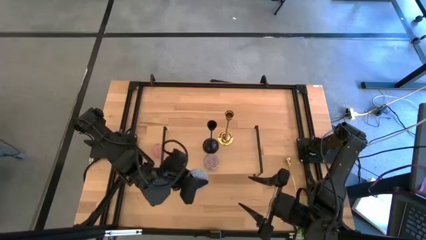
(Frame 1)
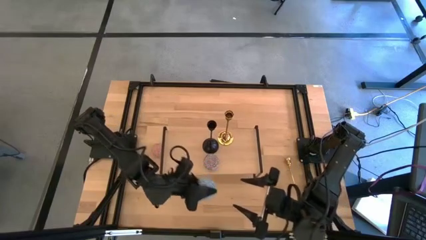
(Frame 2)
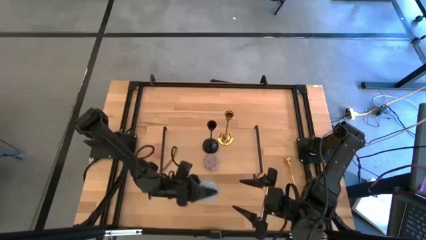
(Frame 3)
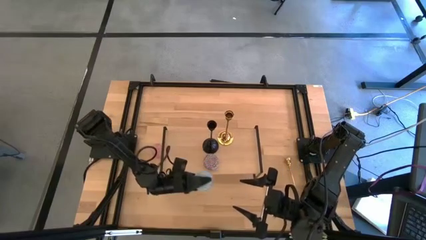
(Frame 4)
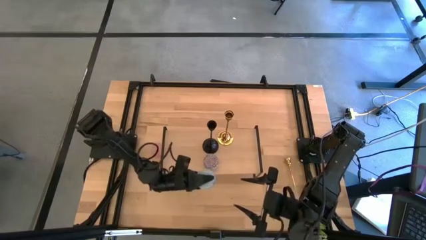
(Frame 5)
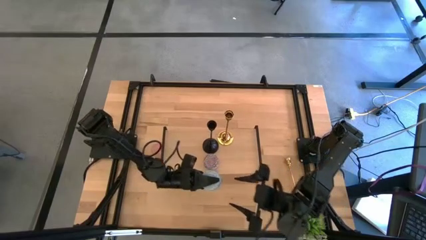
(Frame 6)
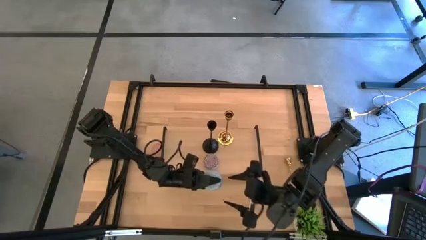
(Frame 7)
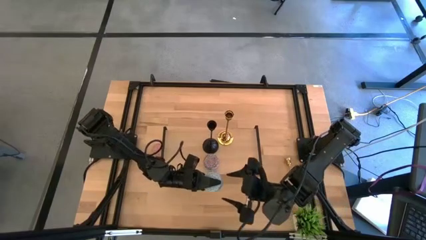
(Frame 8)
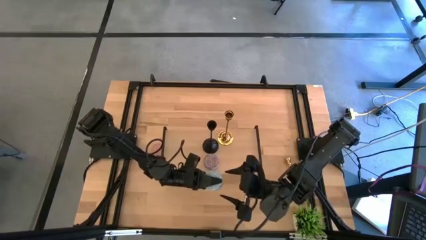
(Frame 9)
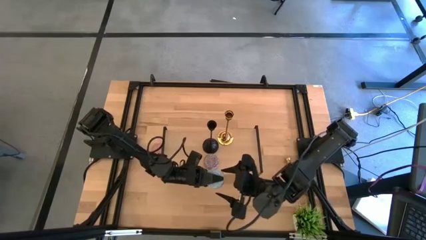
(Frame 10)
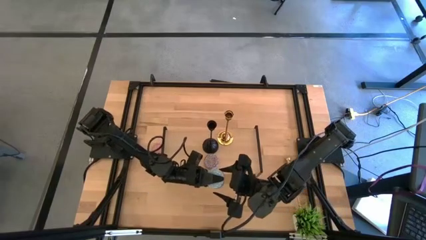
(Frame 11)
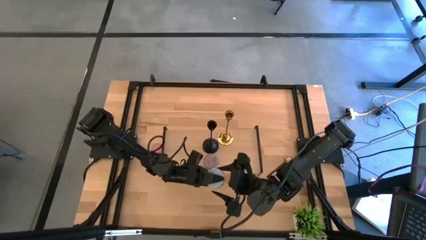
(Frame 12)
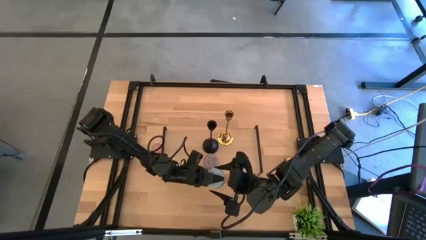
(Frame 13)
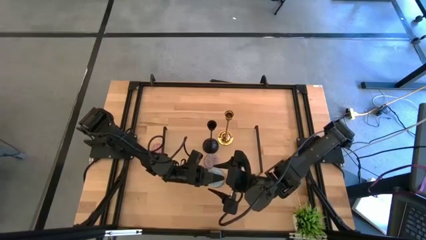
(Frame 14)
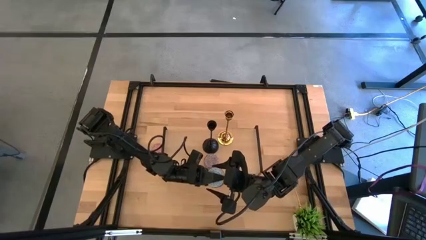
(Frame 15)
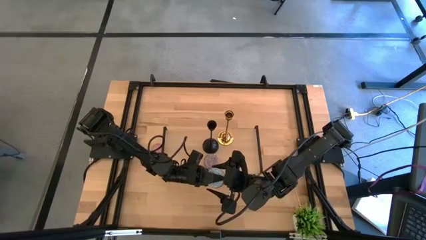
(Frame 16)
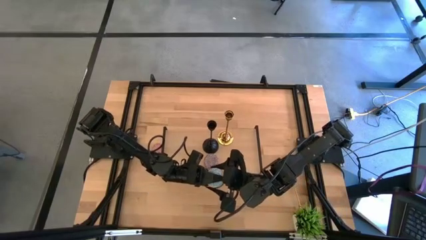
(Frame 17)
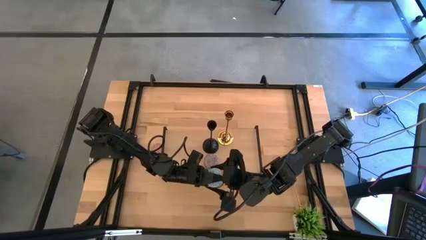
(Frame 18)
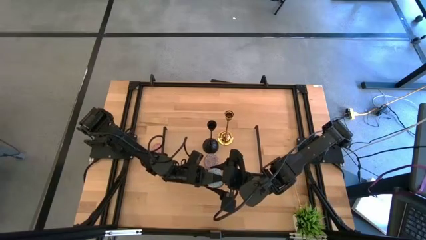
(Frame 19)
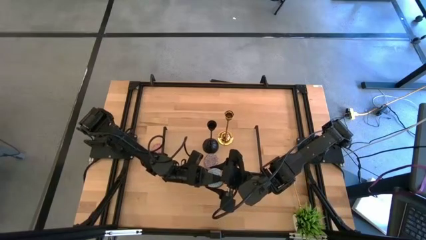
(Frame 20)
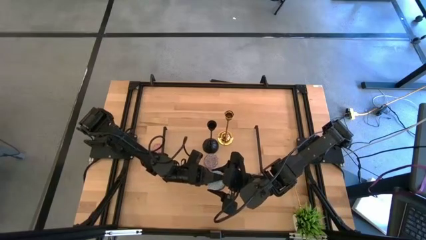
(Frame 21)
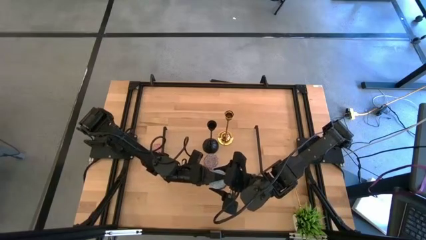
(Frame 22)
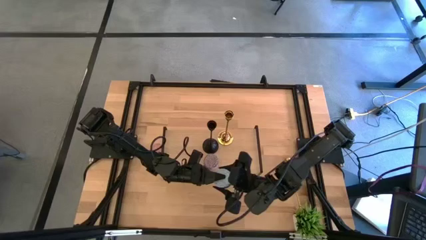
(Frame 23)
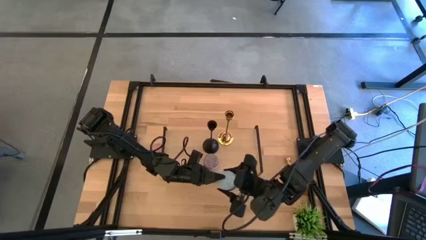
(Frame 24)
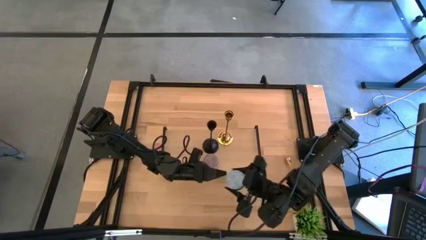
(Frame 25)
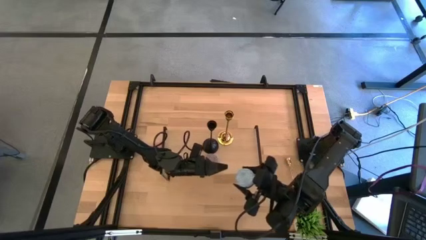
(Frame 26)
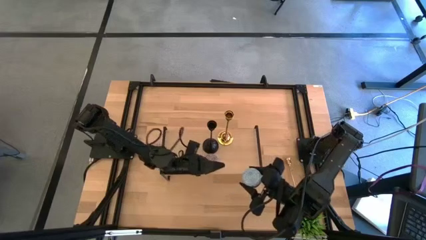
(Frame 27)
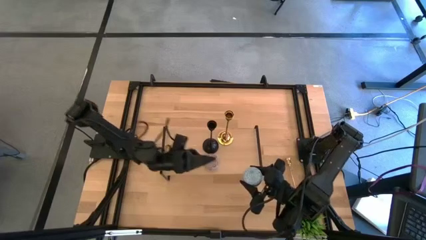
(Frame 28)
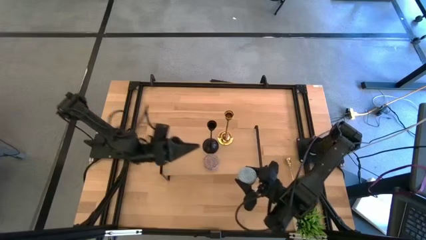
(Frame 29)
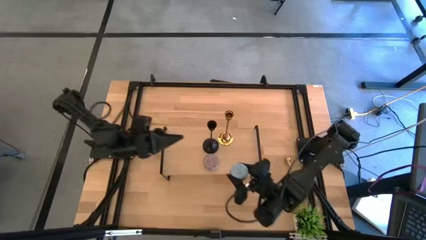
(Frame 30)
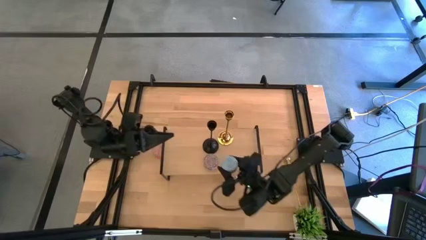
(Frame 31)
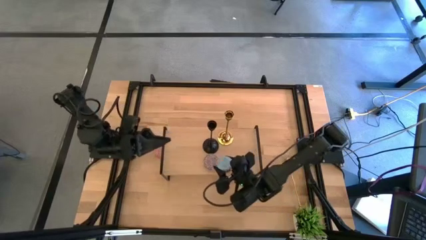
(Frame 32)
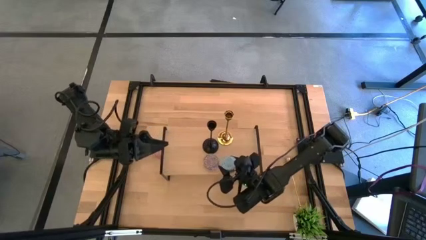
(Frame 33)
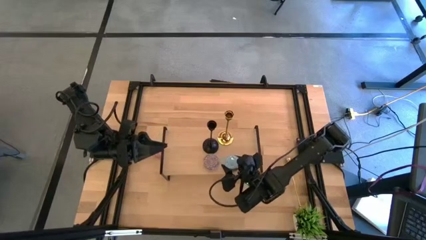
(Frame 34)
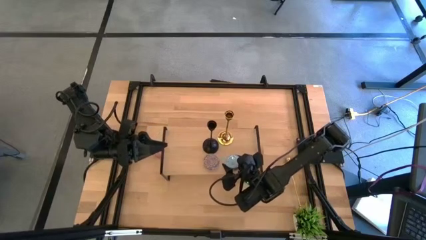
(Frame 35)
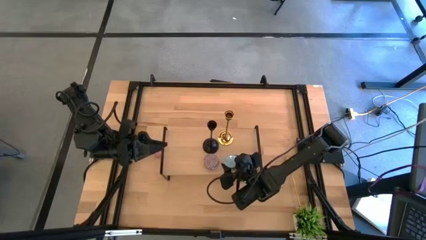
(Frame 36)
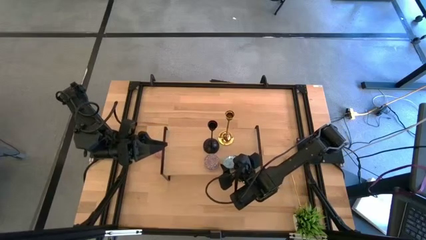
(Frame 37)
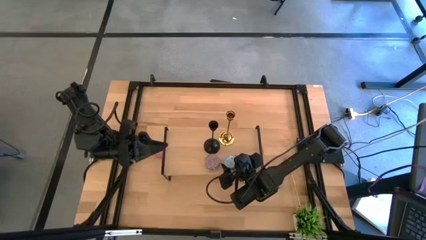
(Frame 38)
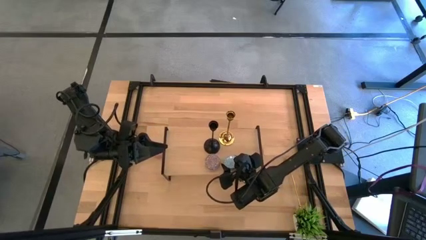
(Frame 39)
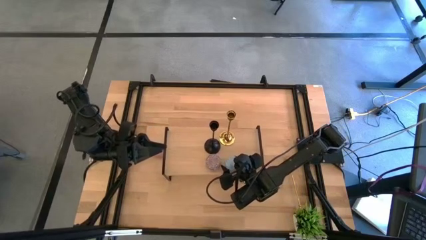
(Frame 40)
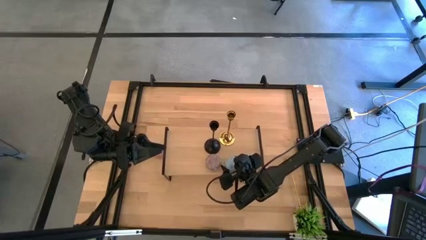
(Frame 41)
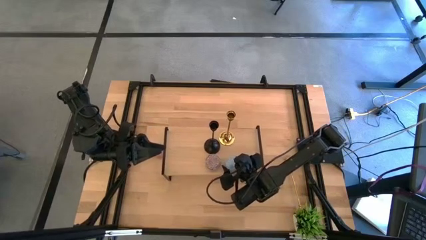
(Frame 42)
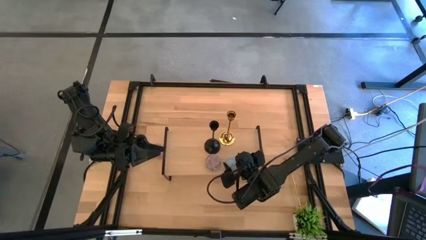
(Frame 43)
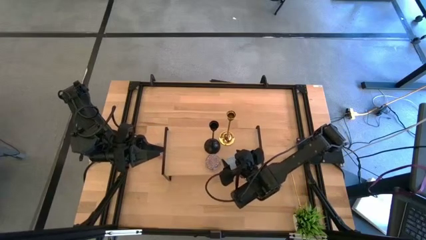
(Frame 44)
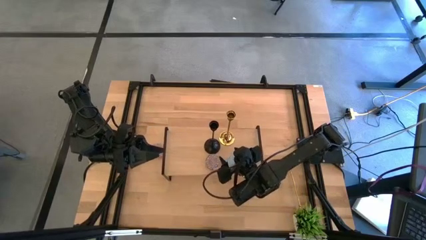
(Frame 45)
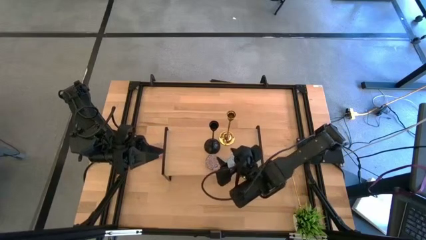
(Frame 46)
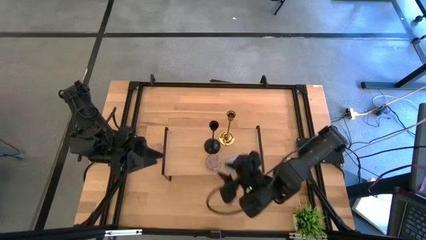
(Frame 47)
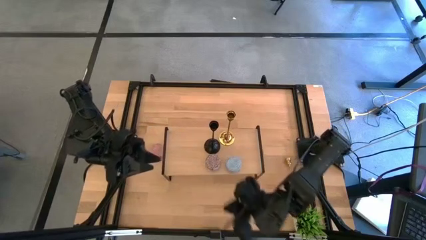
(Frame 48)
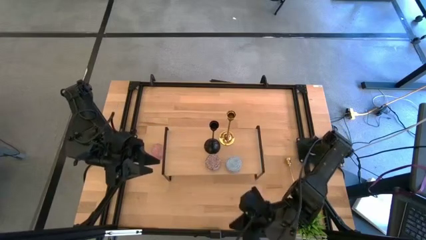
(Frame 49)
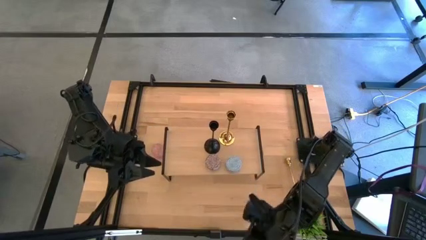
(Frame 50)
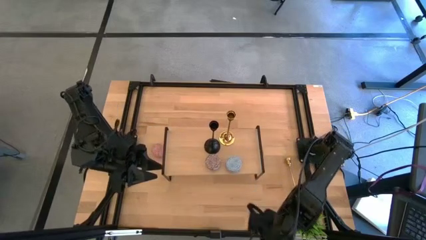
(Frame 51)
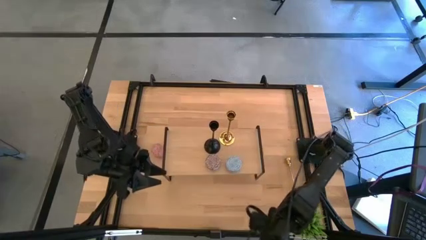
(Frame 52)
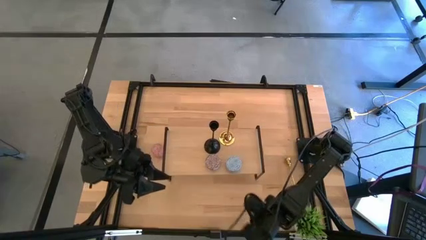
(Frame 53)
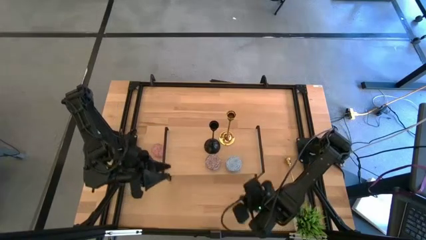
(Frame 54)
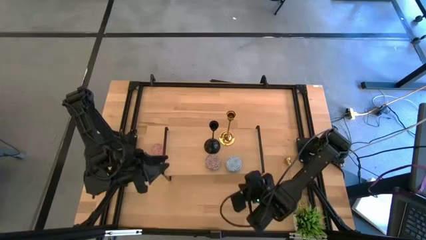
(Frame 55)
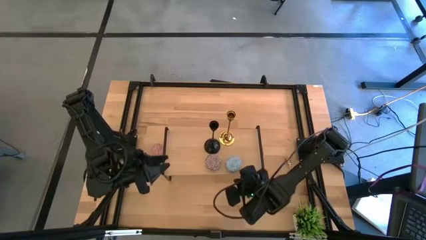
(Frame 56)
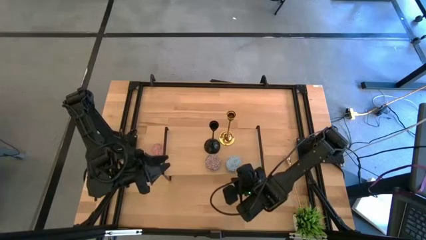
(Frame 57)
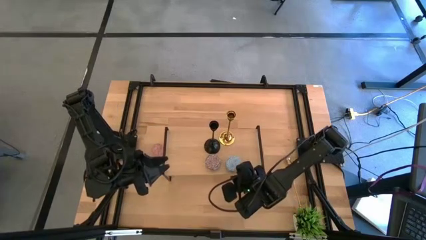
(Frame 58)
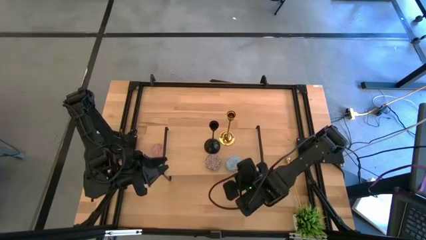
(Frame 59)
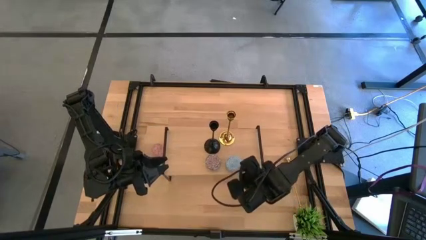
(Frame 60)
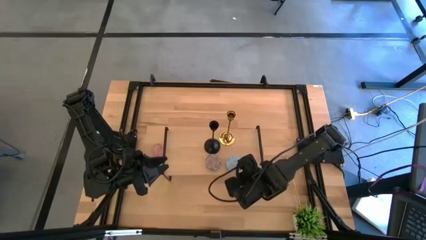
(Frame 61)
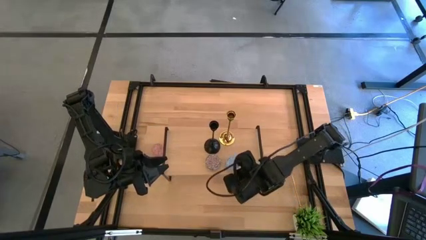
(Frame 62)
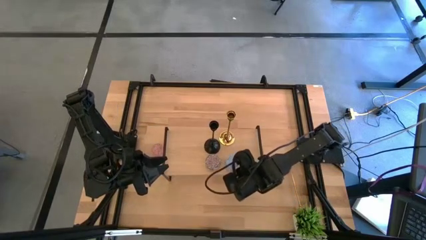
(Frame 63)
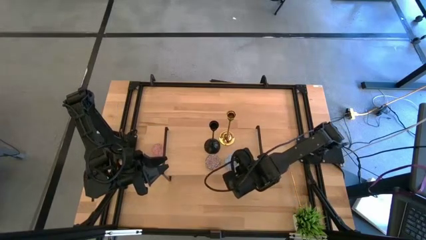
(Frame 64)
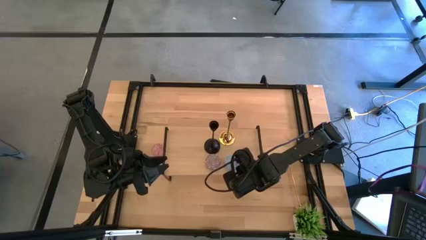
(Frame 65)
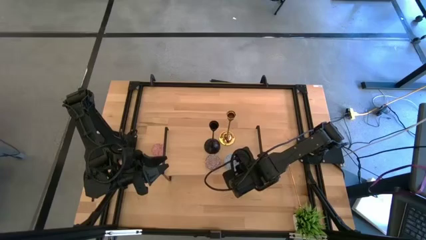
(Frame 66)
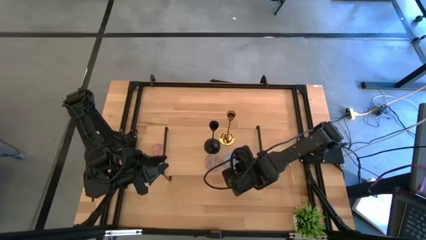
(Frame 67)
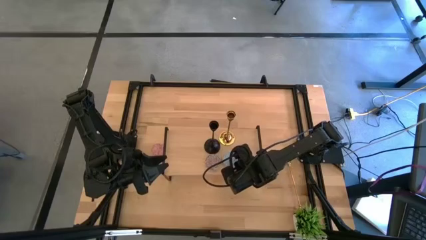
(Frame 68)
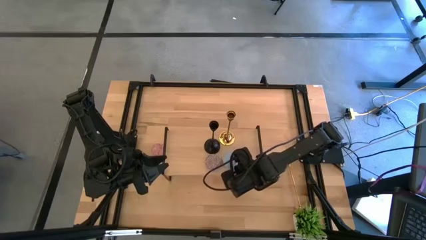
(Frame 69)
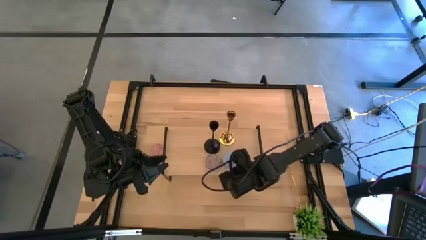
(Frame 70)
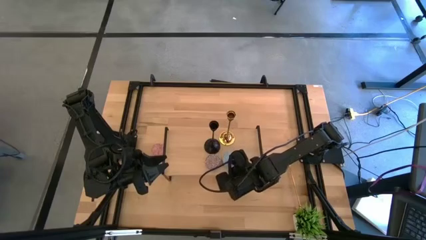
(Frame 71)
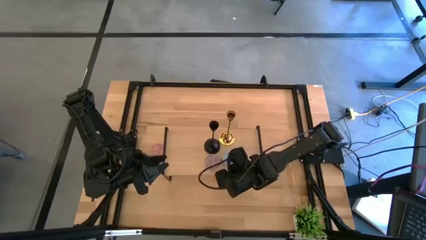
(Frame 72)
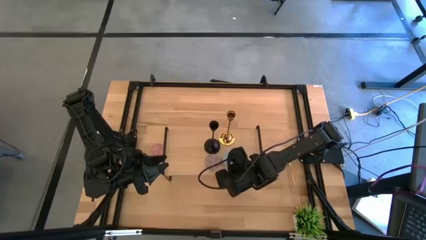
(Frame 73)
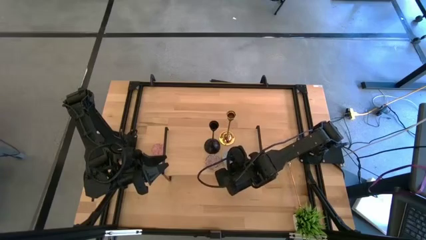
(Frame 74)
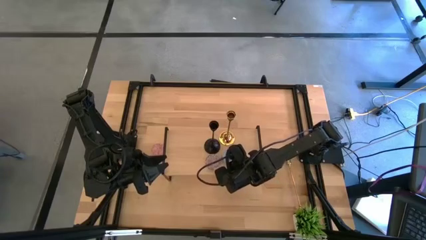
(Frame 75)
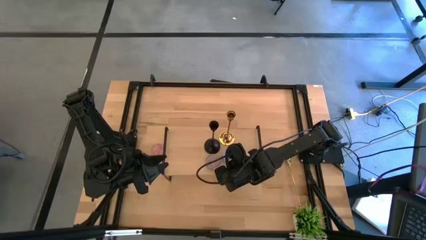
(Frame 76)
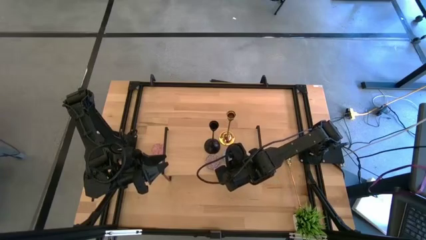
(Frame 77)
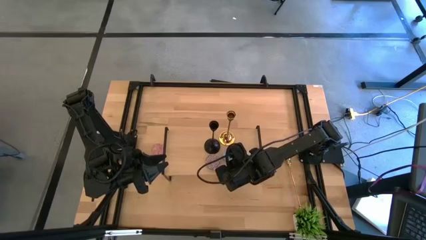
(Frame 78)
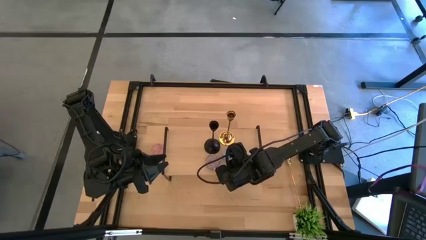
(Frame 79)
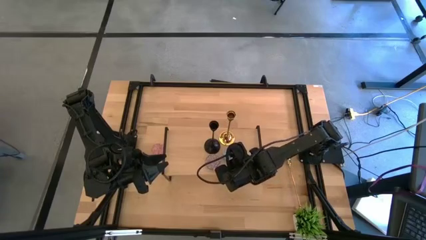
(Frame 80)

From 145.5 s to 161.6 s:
Task: Pick & Place candle stick holders
Put the blue scented candle on the shelf
